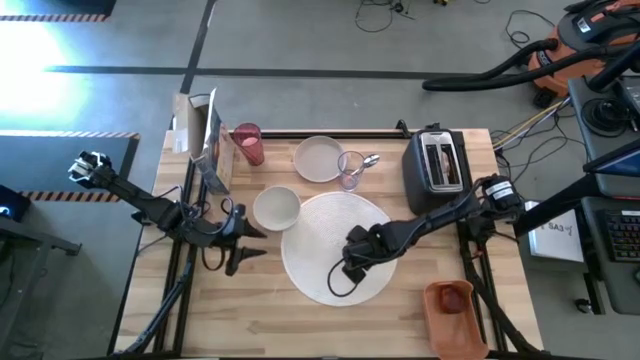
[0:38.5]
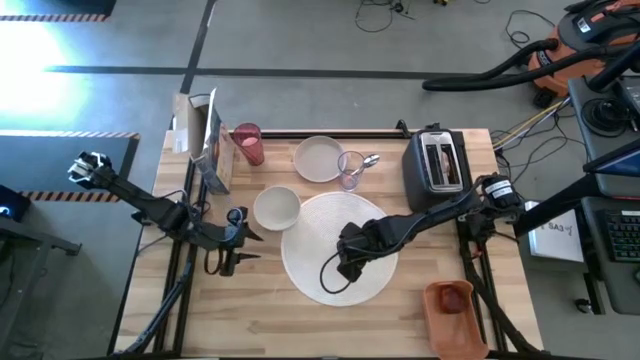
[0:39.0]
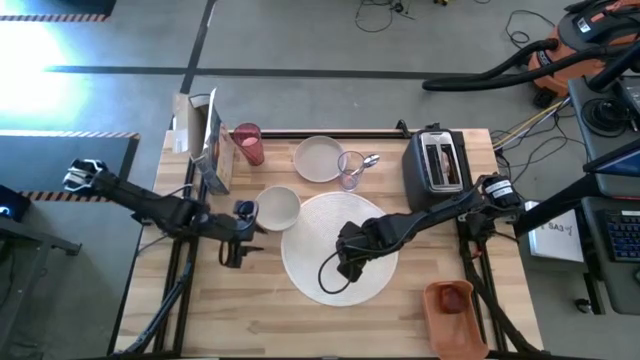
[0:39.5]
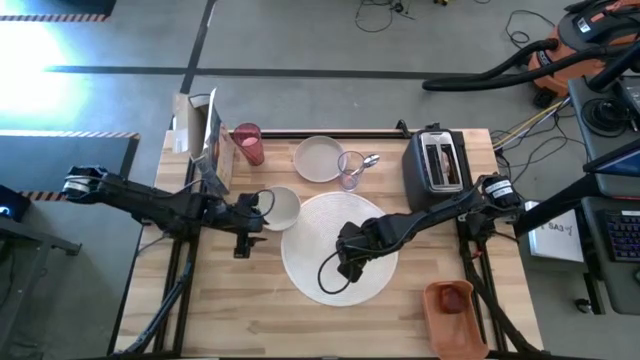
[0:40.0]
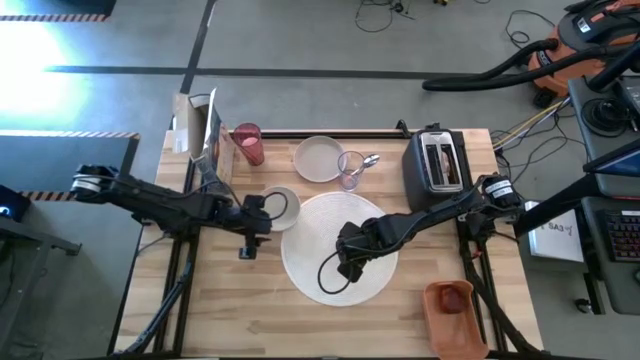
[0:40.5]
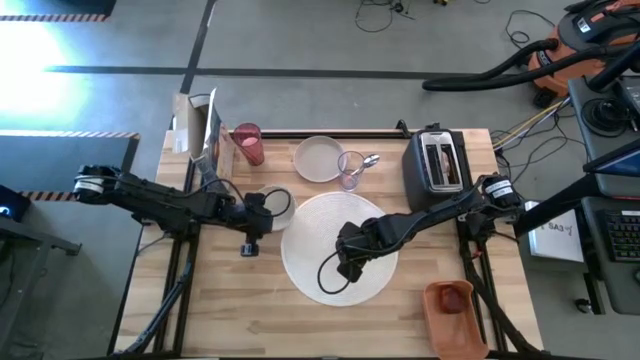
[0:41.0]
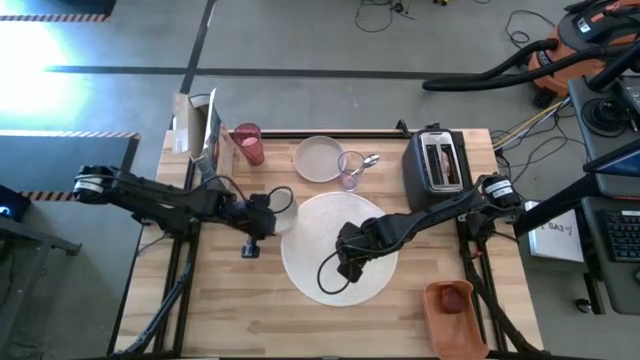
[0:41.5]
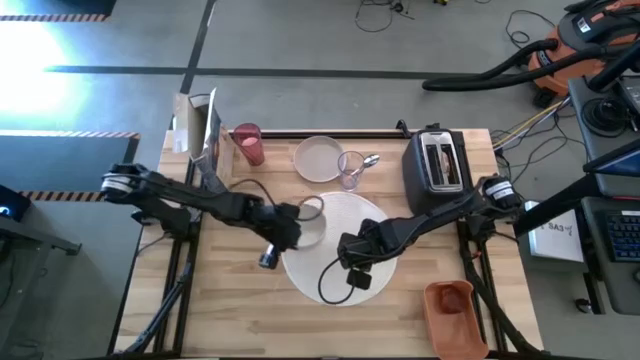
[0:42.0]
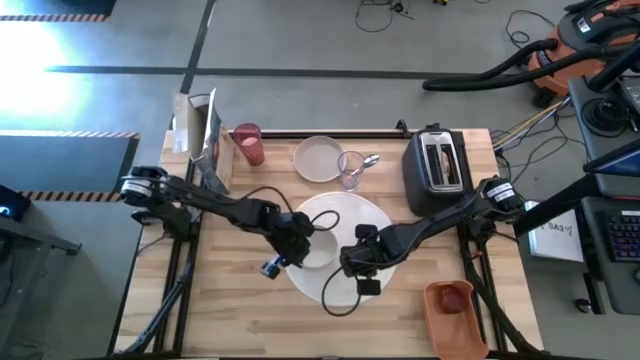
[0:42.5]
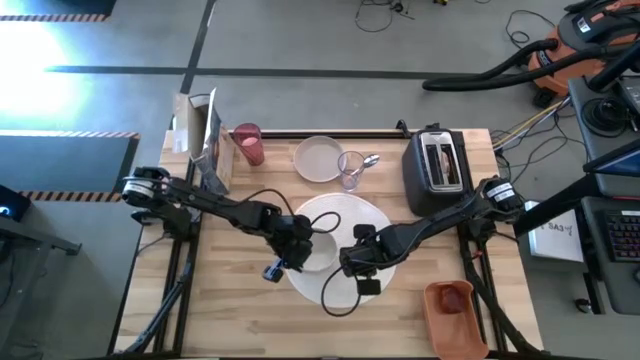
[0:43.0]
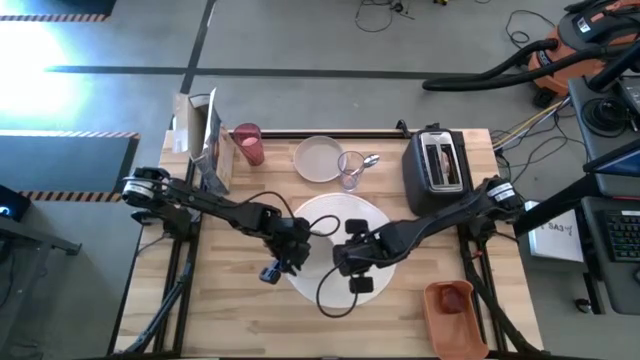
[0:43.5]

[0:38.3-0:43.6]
Task: Arrange a breakfast setting
Put the white bowl on the white tablemat

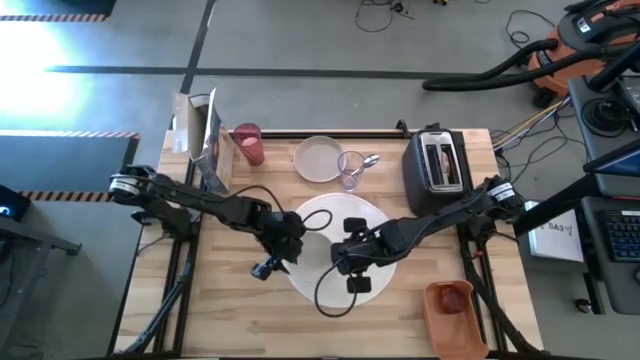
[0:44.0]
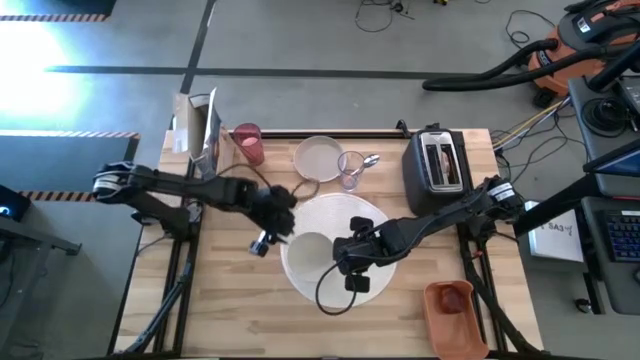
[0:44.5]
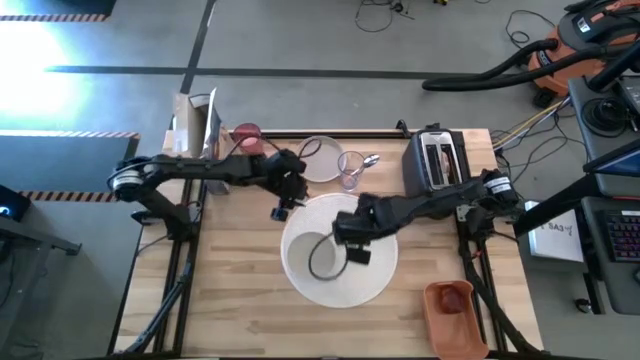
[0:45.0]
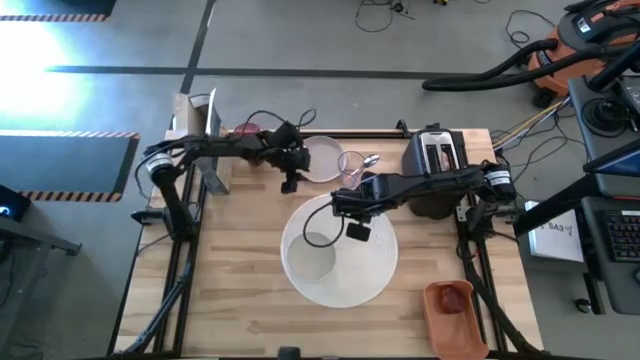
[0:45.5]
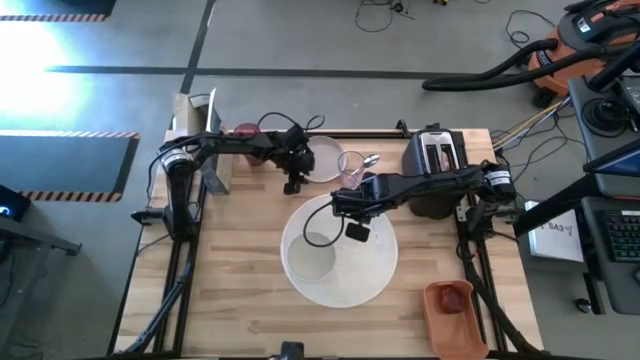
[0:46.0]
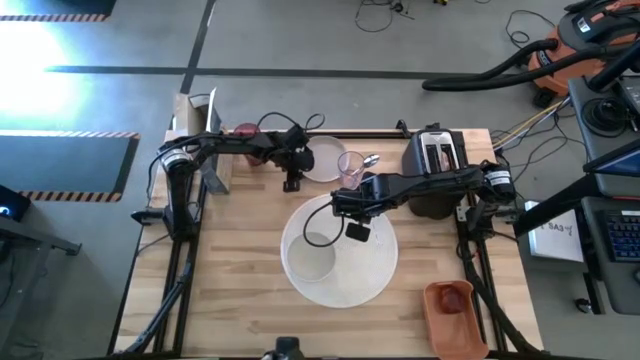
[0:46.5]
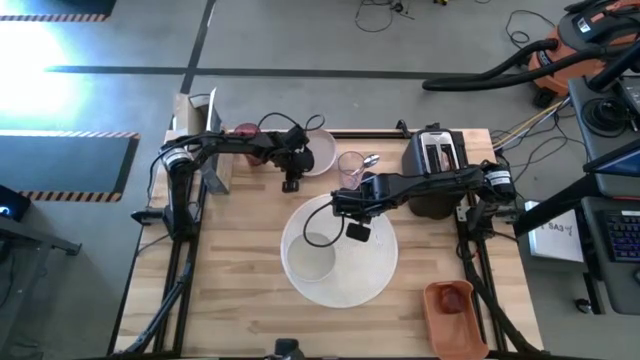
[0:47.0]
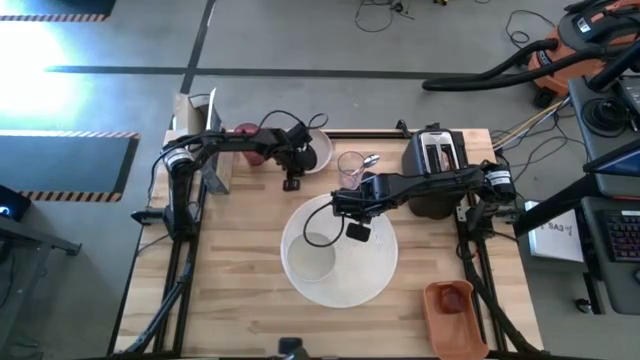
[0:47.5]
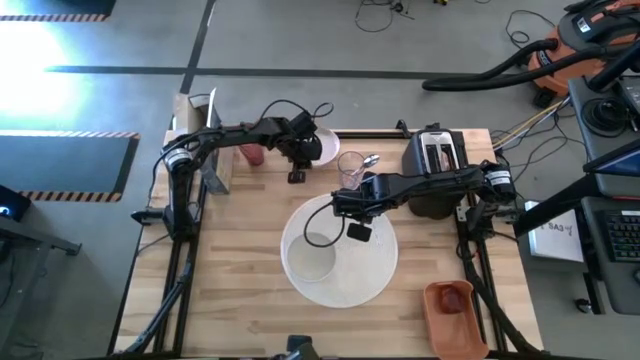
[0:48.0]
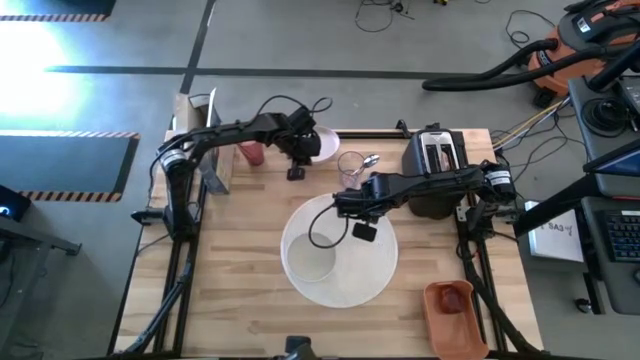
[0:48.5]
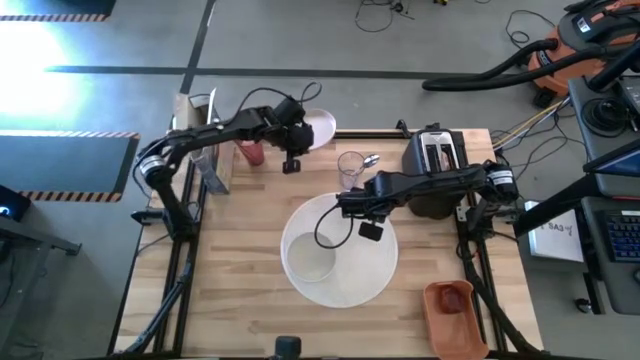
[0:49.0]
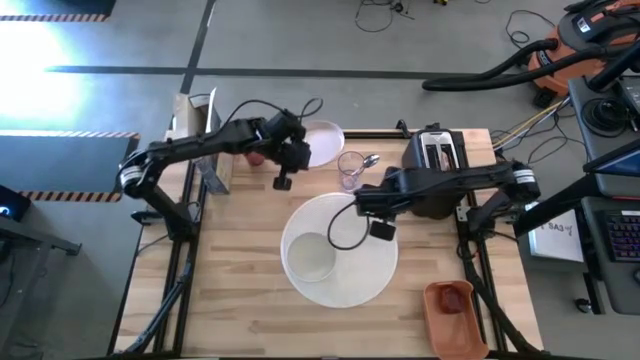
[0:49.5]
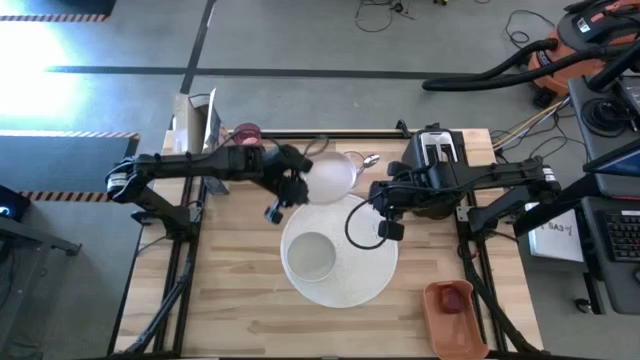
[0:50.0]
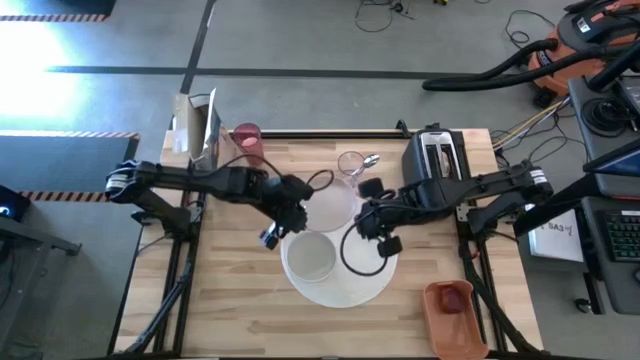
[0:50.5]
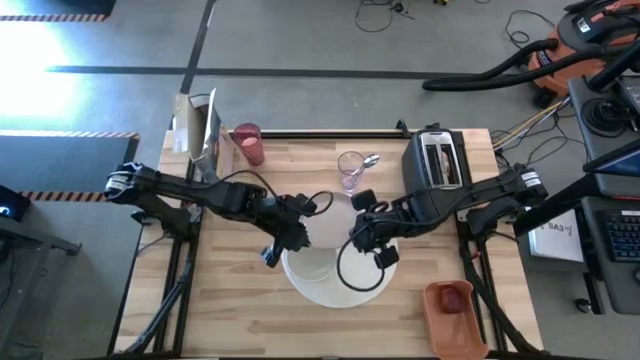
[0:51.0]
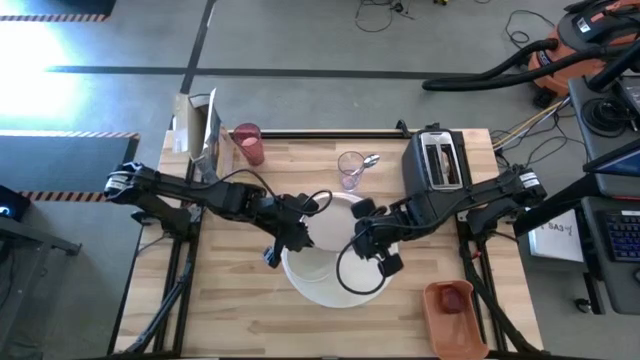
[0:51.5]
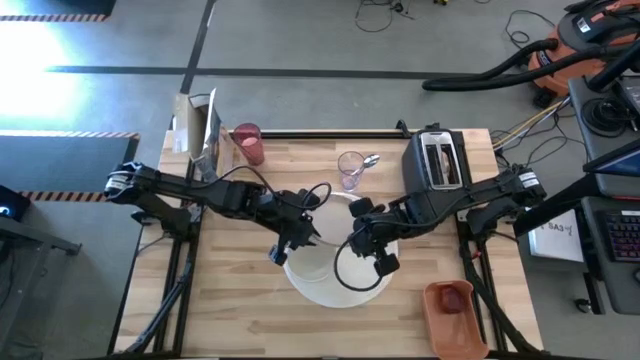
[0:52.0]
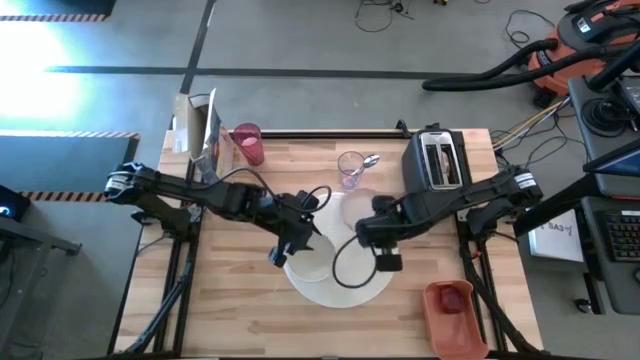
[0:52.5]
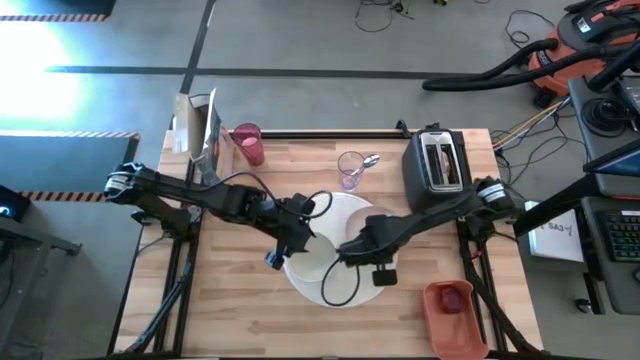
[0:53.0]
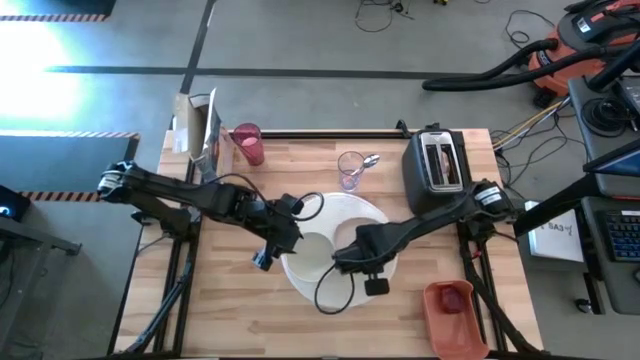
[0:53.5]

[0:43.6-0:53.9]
Put the brown plate on the tablemat to the right of the white bowl

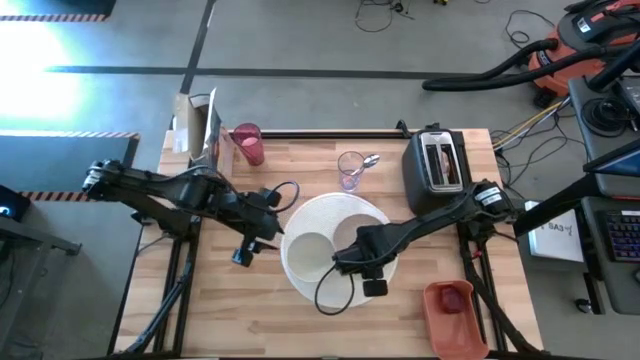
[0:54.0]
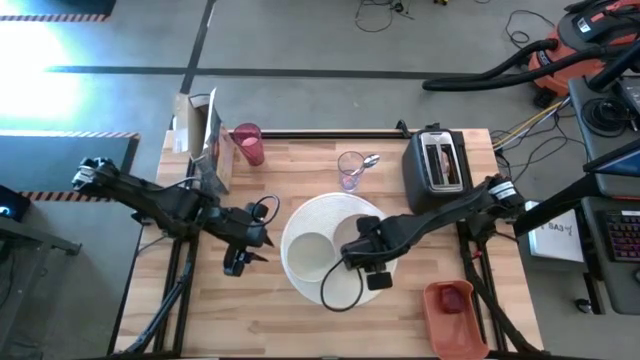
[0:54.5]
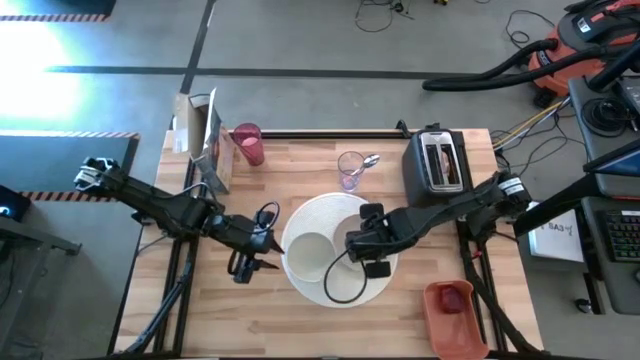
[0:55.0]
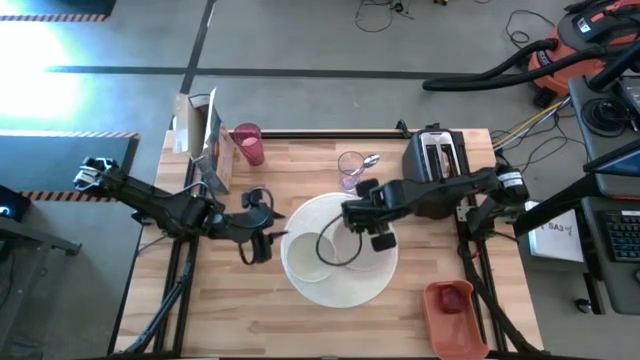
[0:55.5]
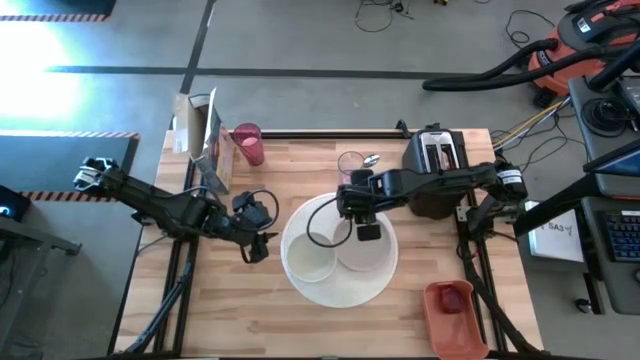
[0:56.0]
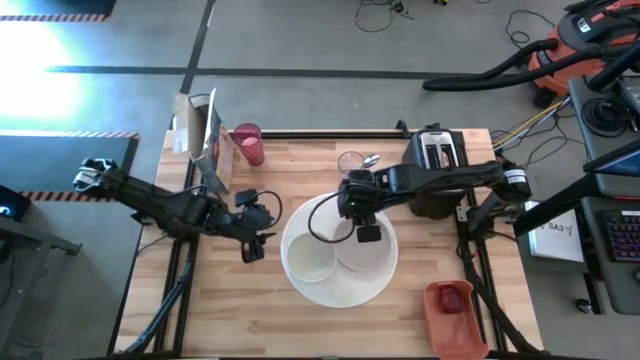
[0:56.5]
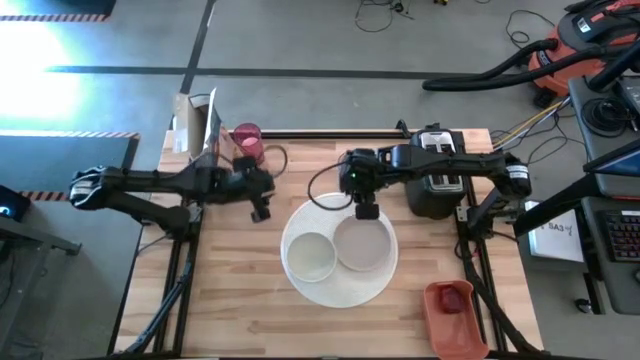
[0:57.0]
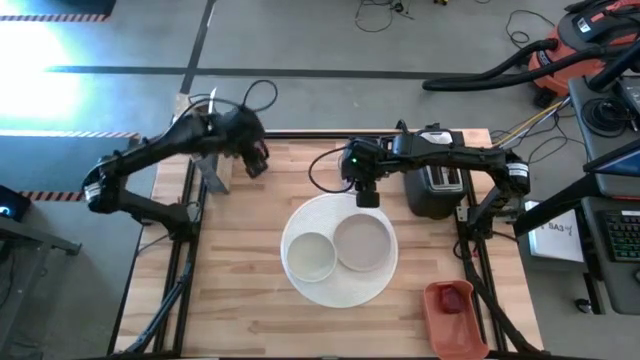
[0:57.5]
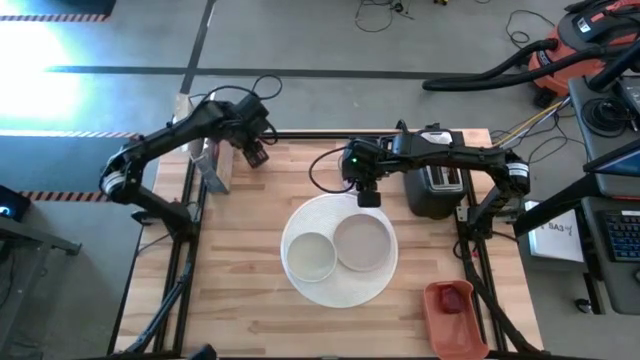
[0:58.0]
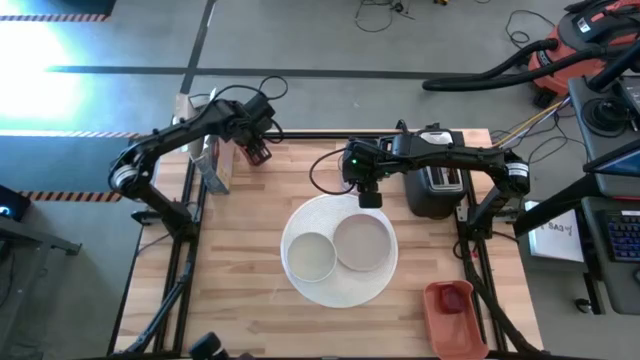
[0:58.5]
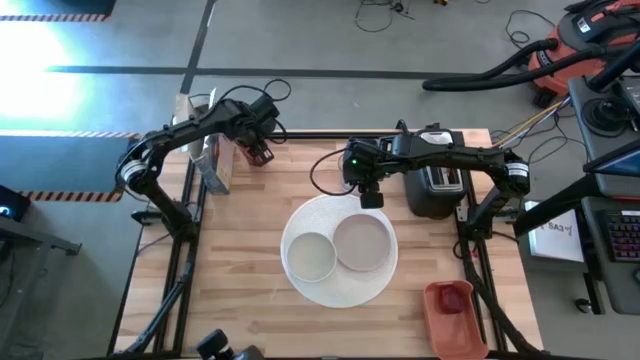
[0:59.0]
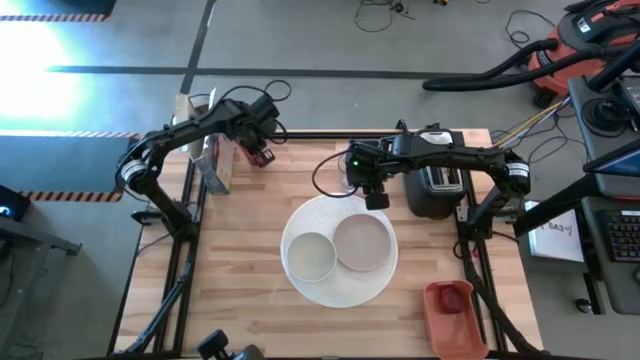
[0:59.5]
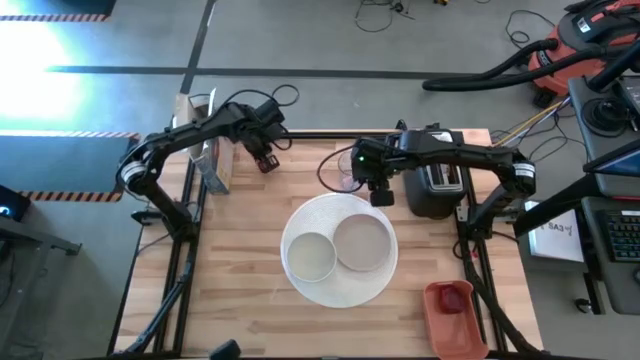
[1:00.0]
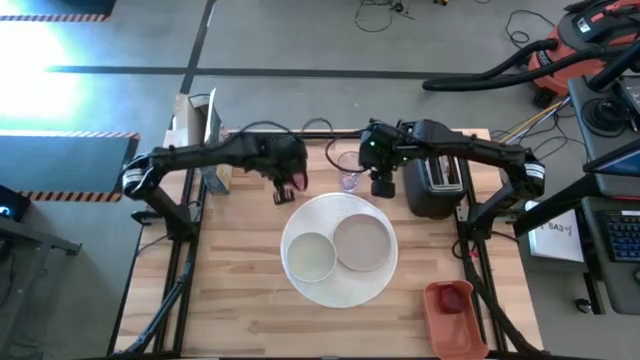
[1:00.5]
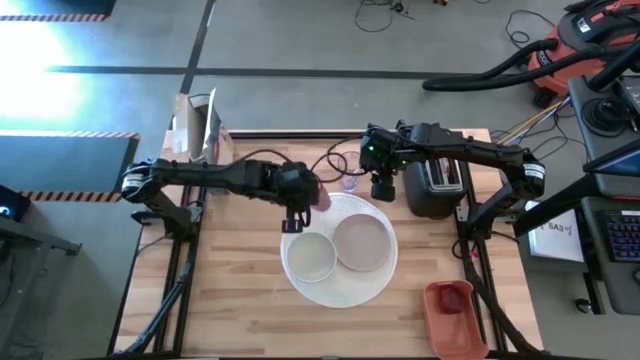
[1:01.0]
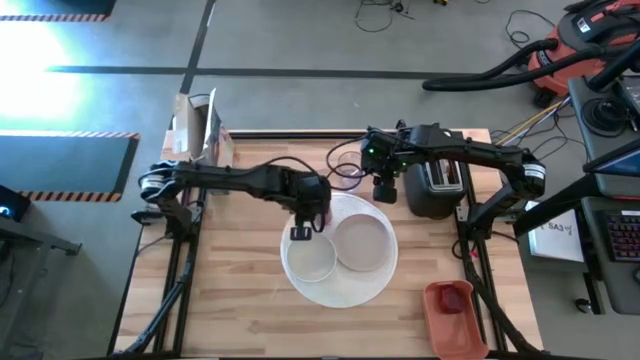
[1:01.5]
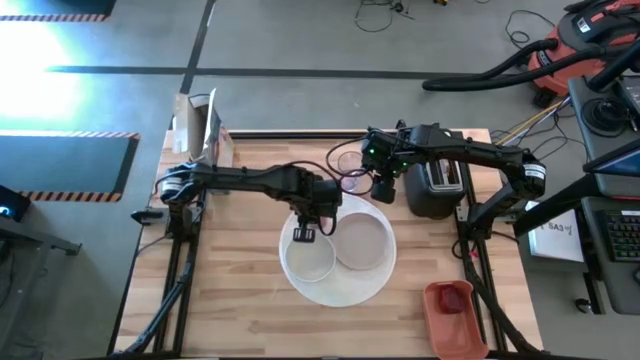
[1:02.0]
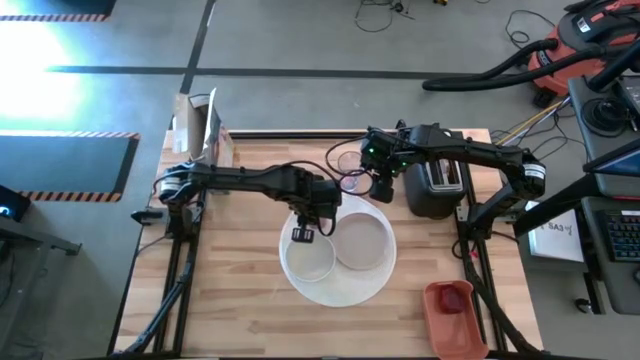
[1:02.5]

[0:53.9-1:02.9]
Put the red cup on the white tablemat to the top left of the brown plate
